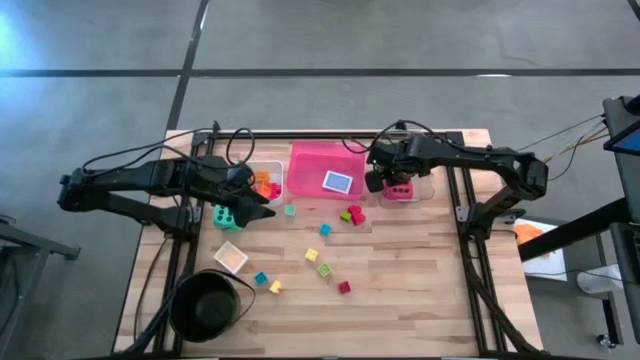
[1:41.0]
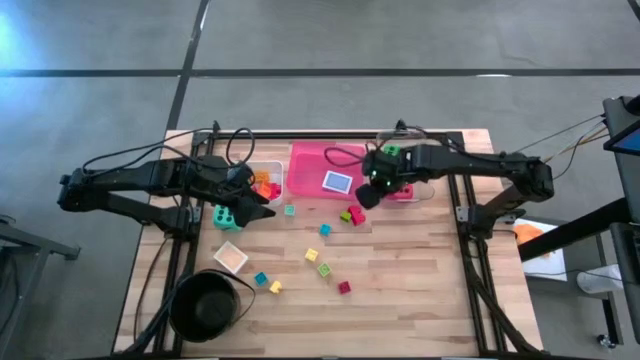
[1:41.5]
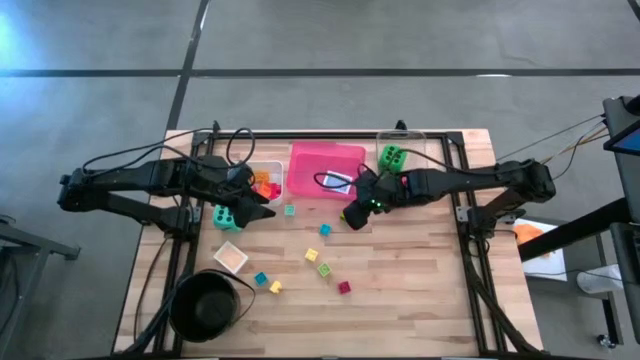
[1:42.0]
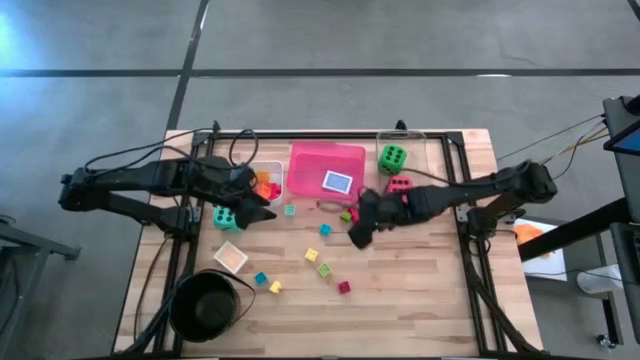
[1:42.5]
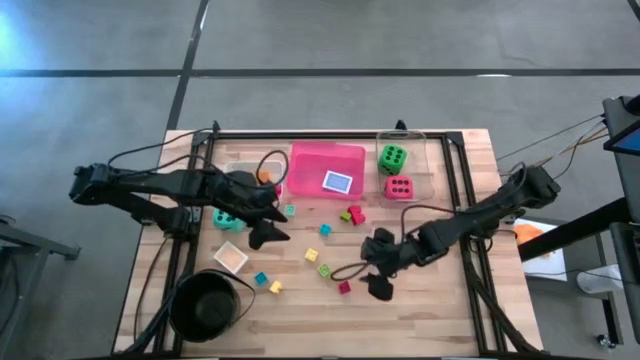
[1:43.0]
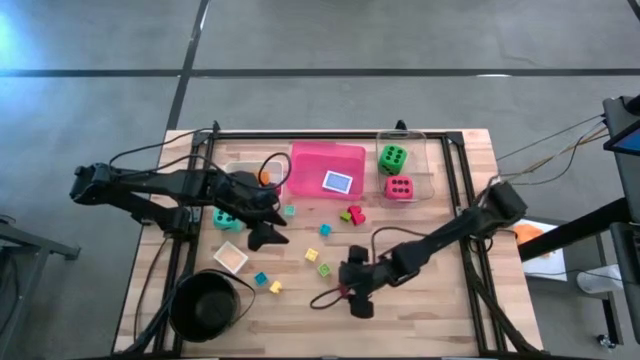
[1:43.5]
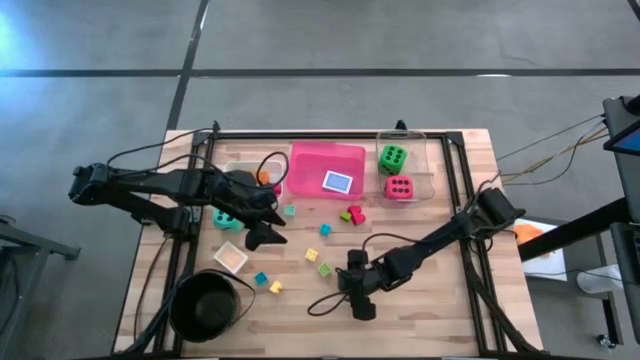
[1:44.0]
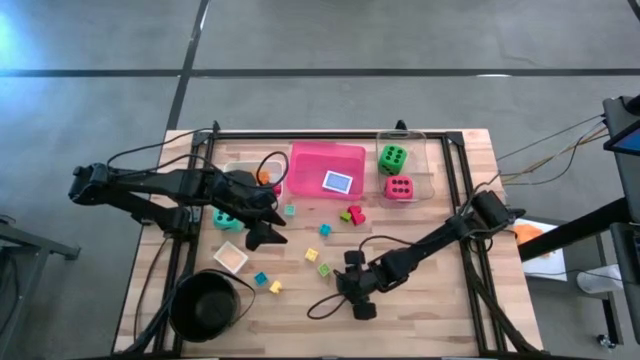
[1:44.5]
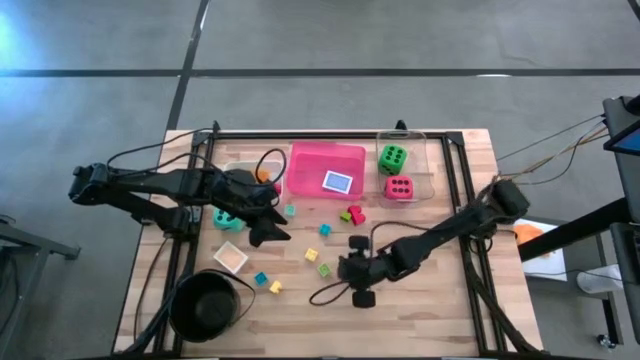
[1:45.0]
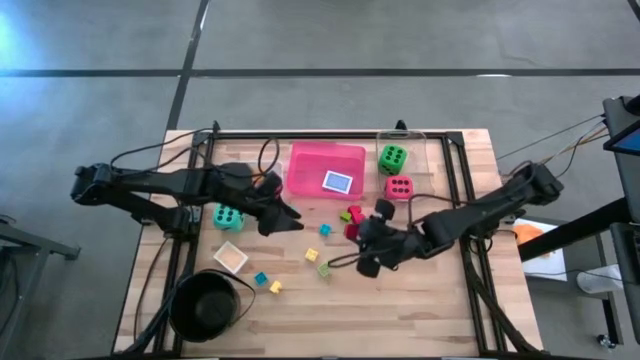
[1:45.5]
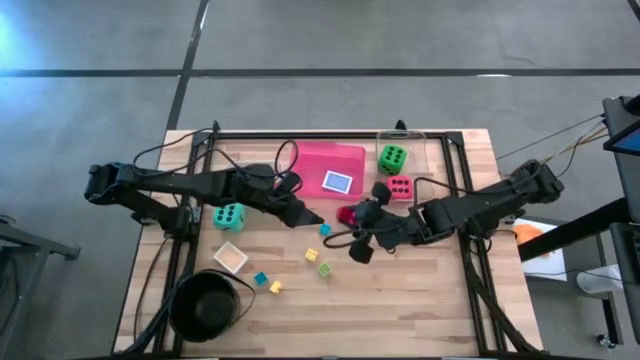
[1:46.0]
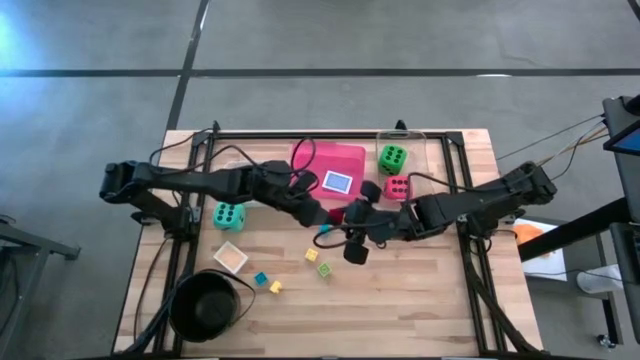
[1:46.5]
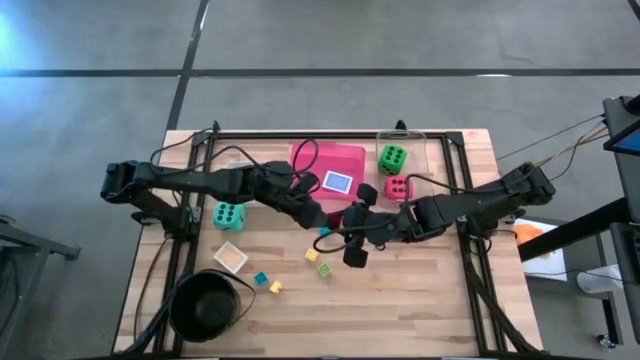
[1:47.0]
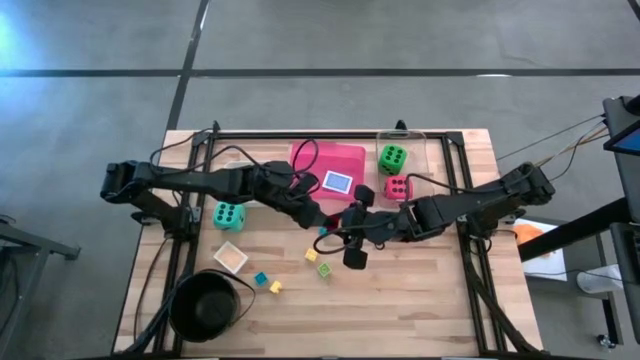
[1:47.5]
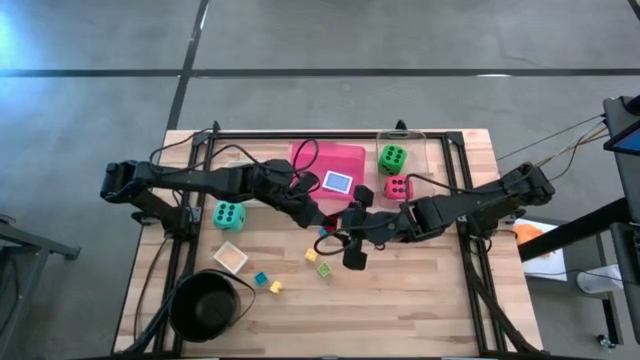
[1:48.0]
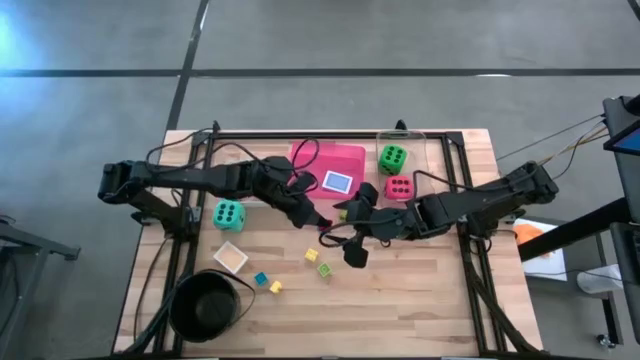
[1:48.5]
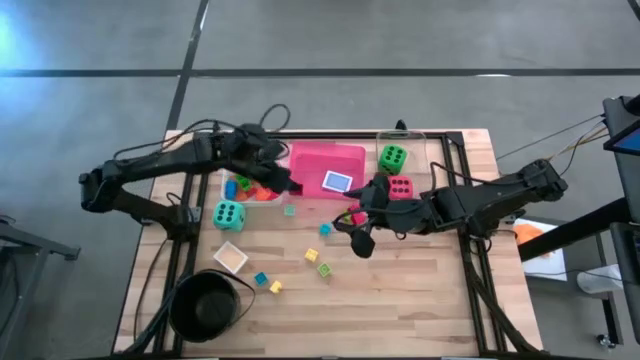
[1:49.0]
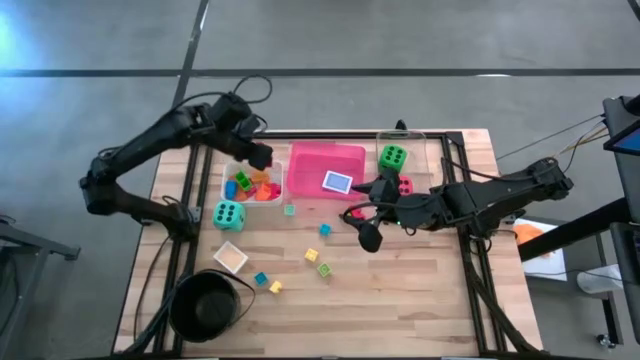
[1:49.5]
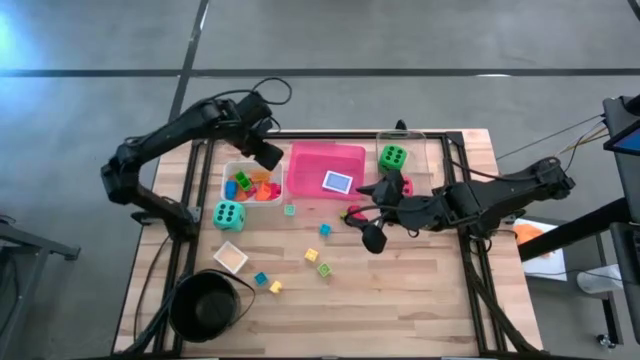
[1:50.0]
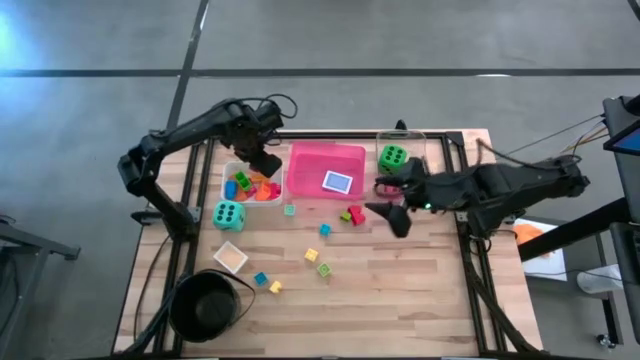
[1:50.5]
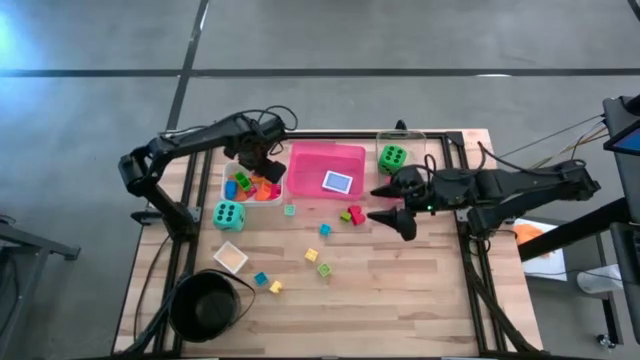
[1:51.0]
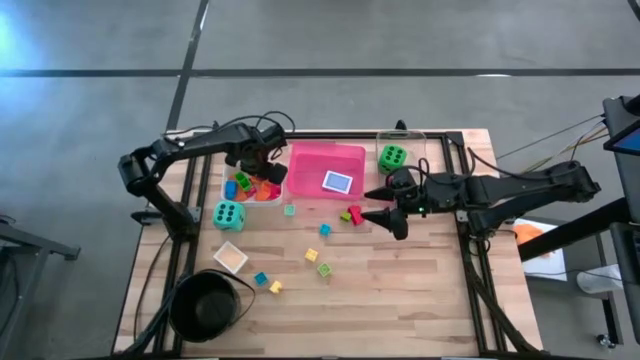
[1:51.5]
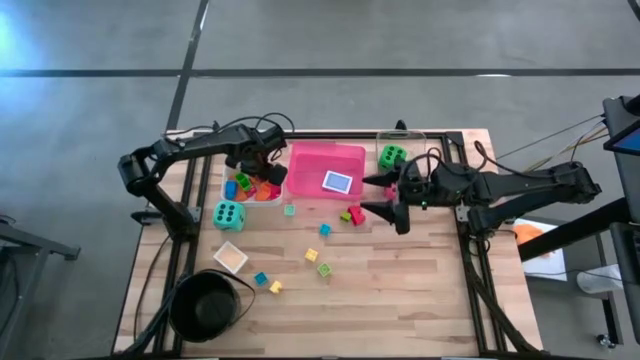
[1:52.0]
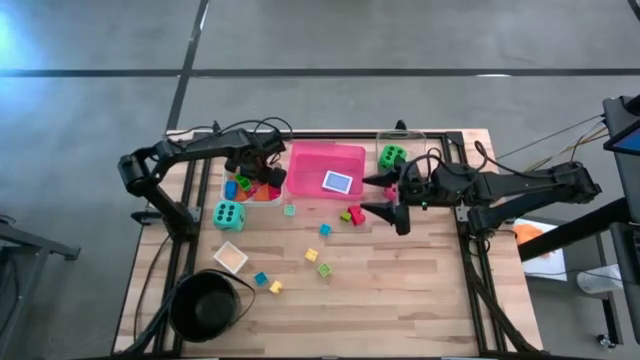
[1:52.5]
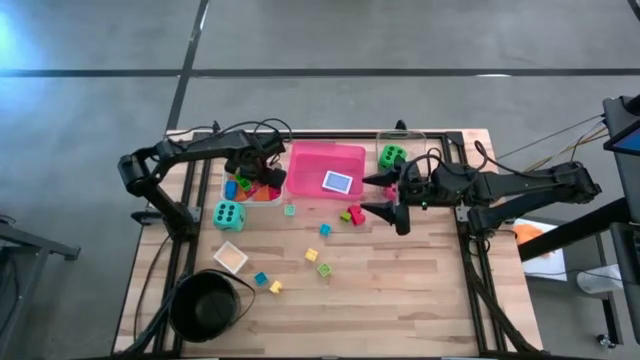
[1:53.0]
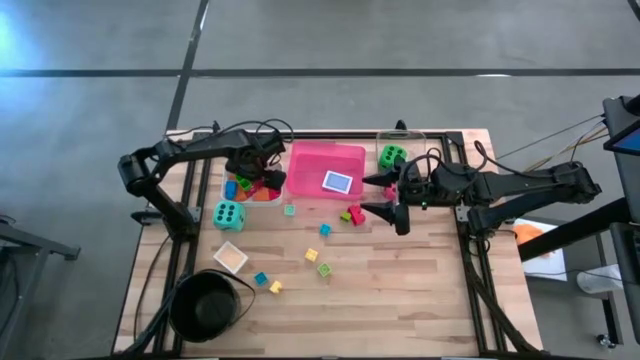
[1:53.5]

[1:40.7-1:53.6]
Task: Pick & Place Toys
Put the red game piece into the white bin

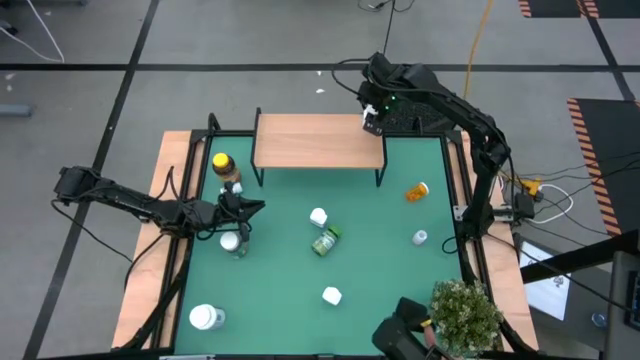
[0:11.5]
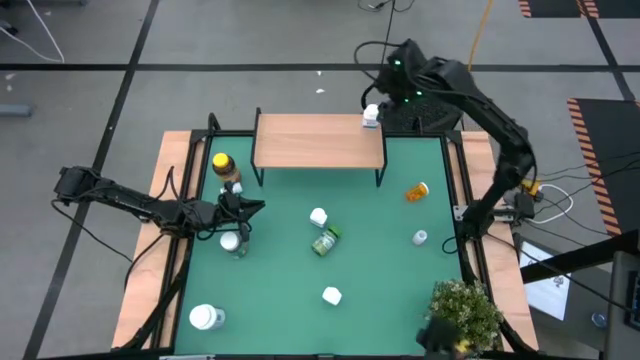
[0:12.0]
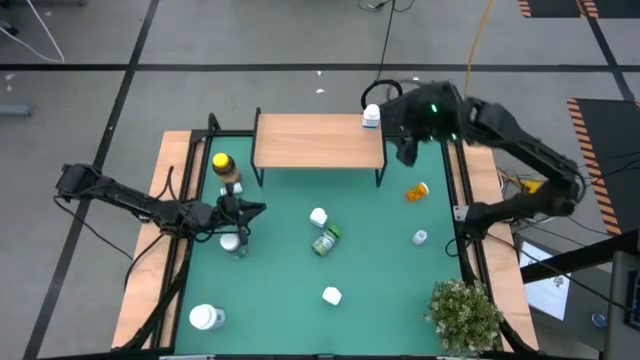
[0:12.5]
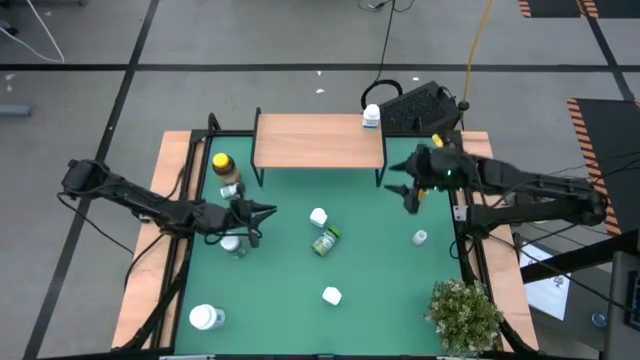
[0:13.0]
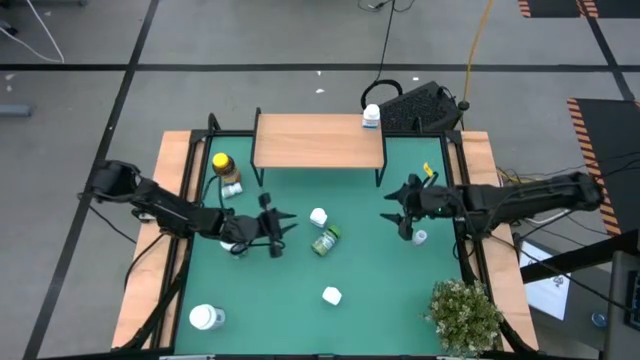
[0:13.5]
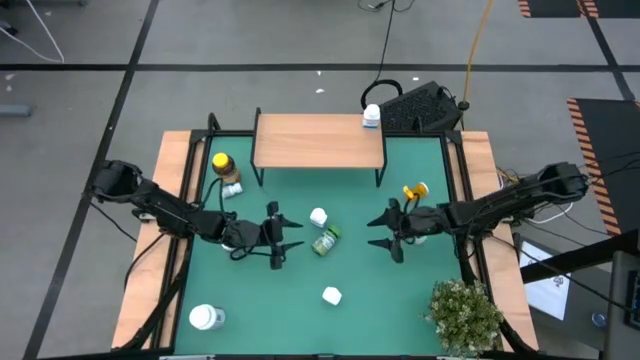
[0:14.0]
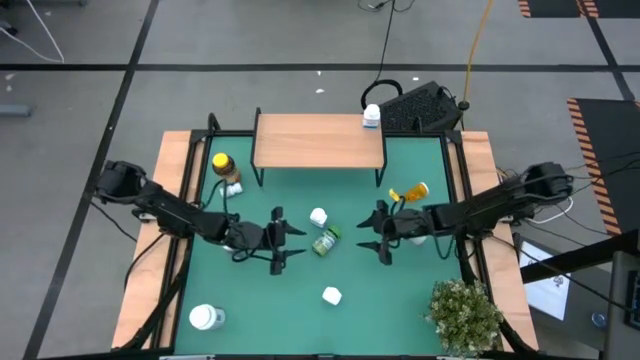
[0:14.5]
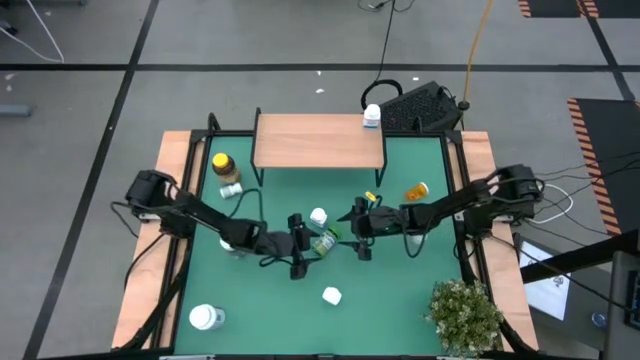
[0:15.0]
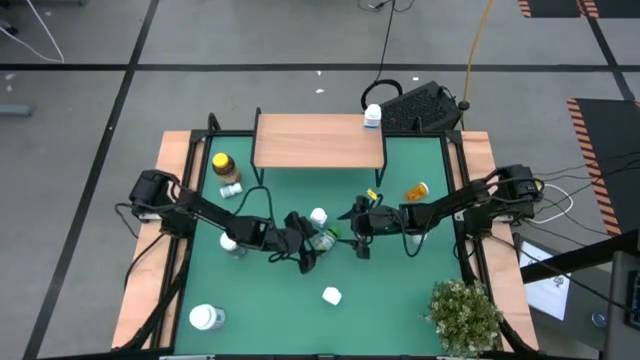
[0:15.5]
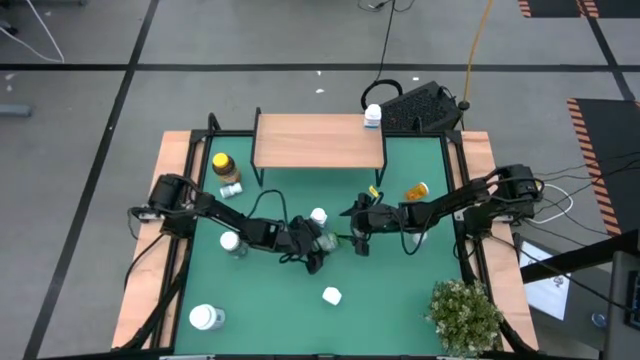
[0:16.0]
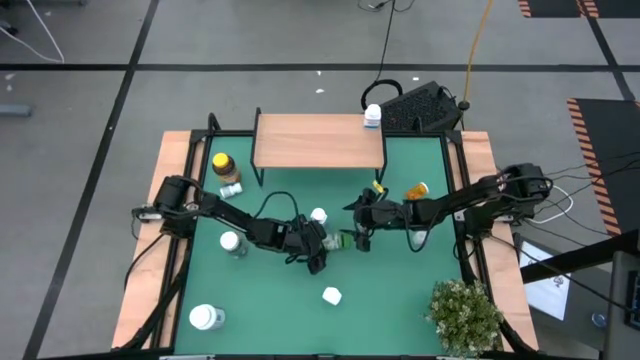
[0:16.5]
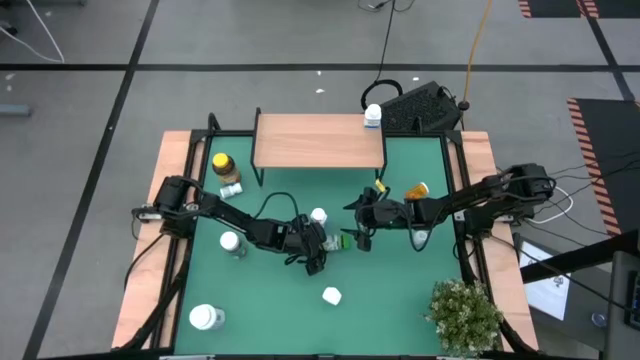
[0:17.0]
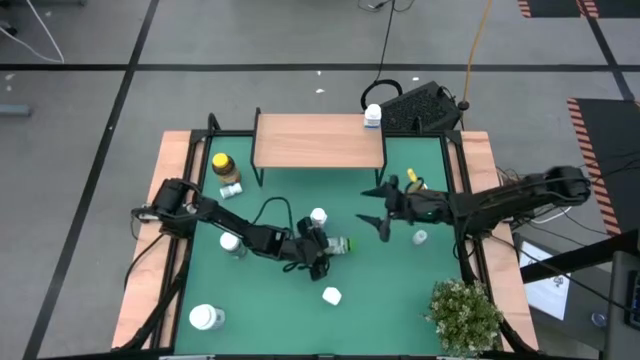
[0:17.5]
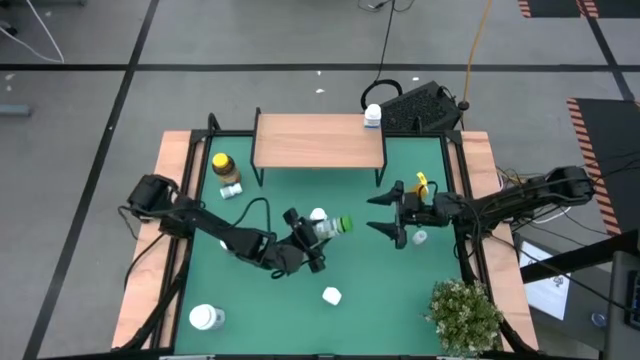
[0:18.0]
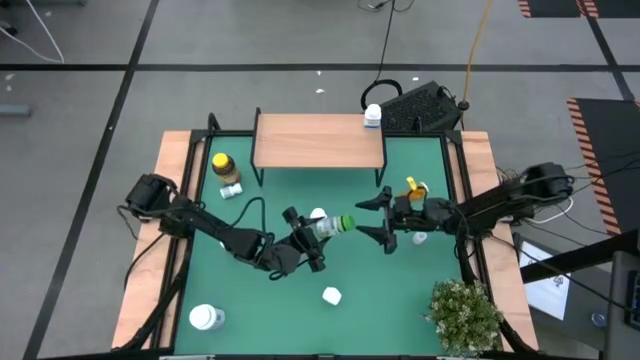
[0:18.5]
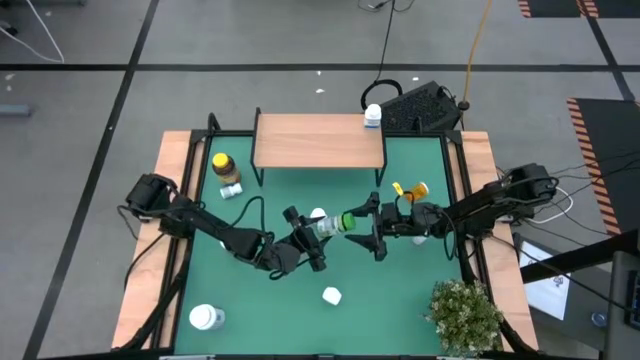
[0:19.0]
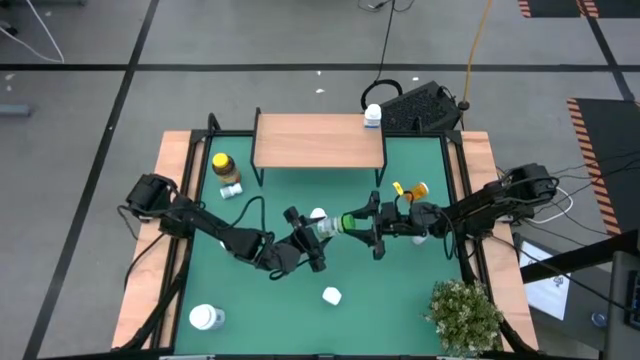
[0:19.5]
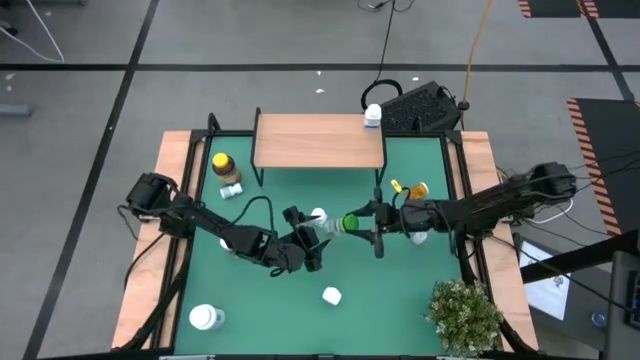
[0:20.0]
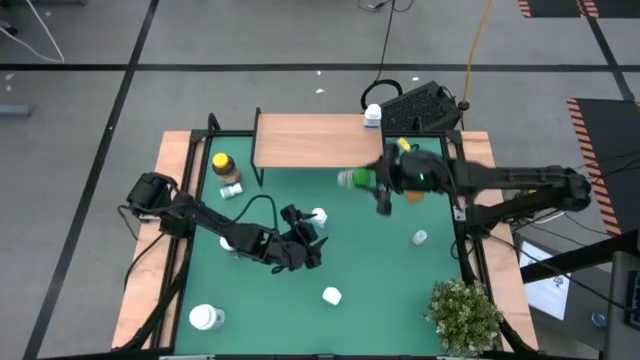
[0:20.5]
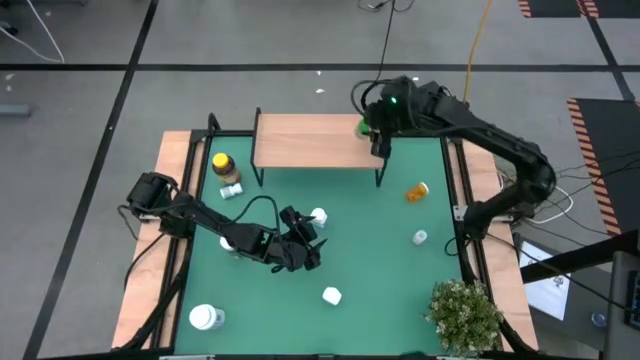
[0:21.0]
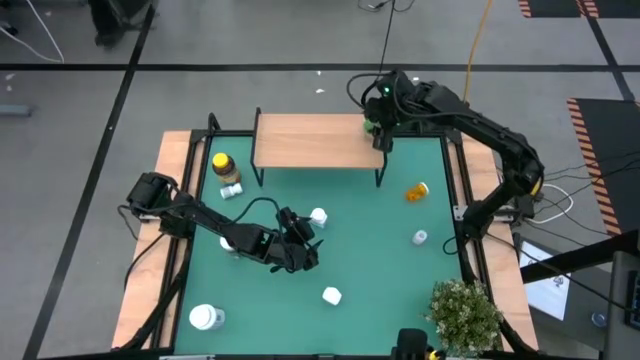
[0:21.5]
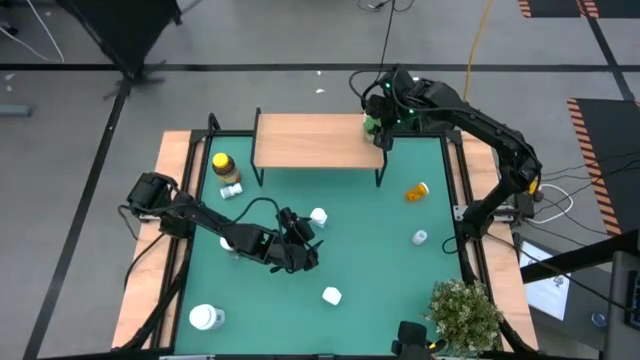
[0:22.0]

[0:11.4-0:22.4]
Task: Pick and place medicine bottles onto shelf by color
Put the right green medicine bottle on the shelf
